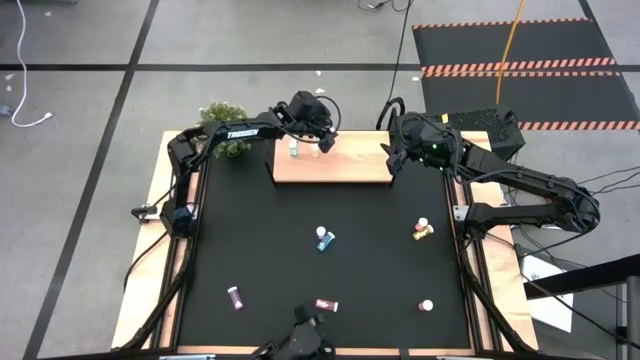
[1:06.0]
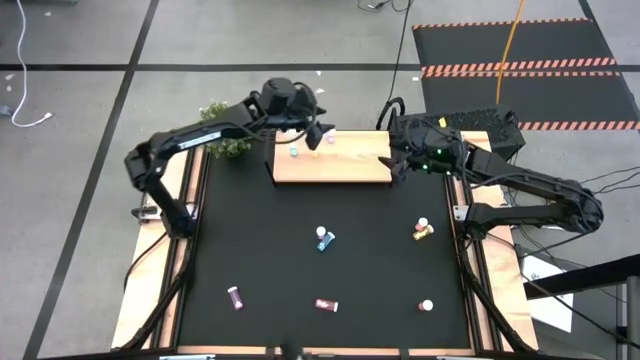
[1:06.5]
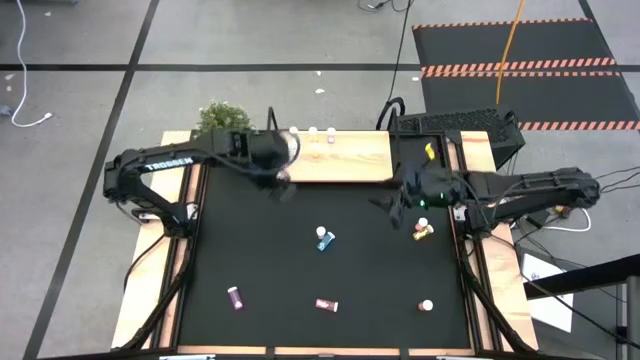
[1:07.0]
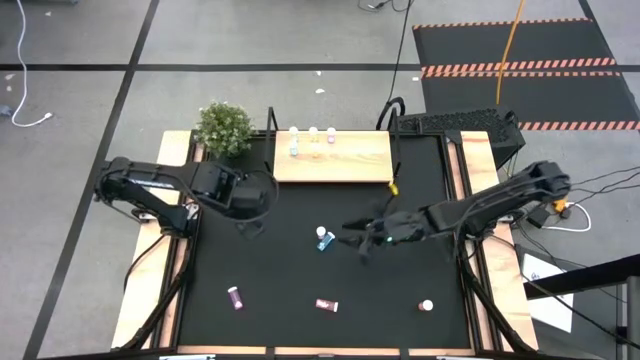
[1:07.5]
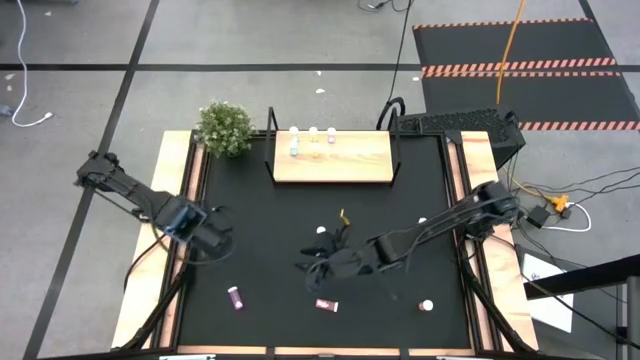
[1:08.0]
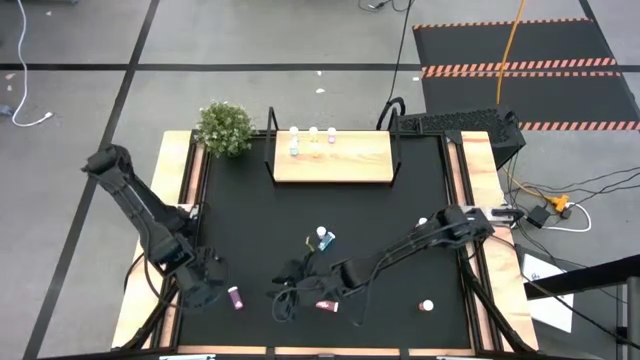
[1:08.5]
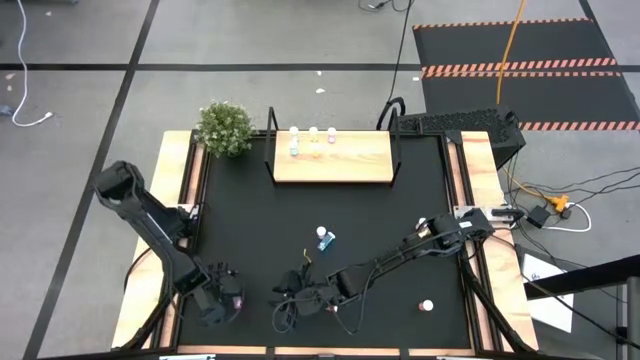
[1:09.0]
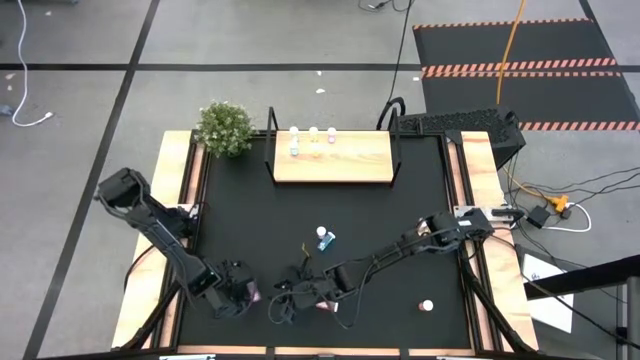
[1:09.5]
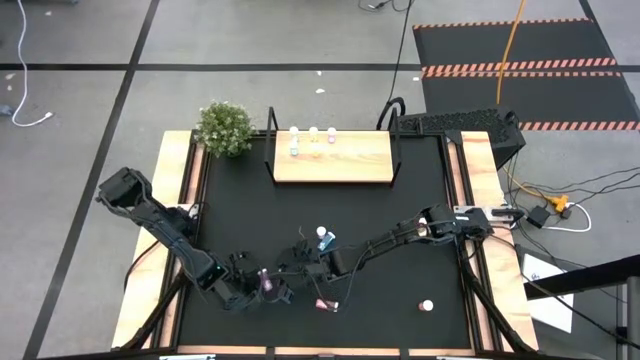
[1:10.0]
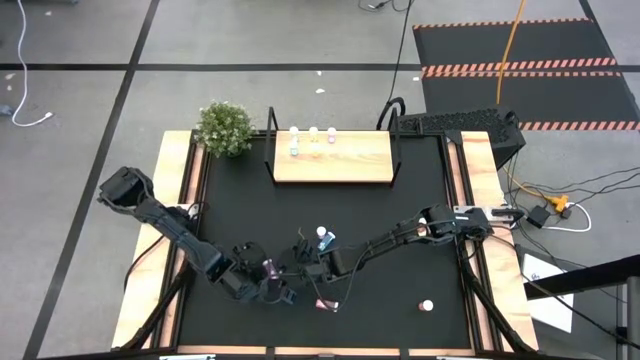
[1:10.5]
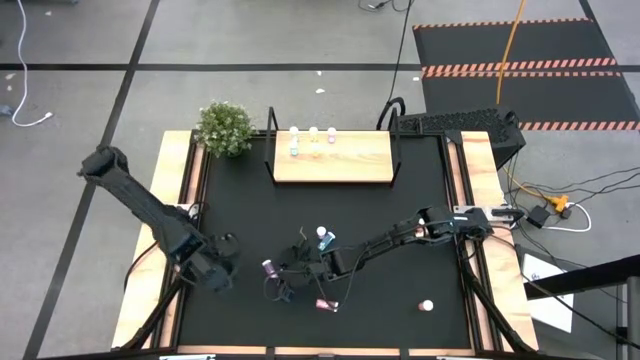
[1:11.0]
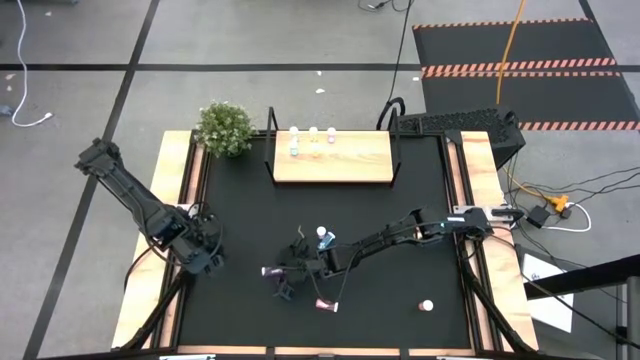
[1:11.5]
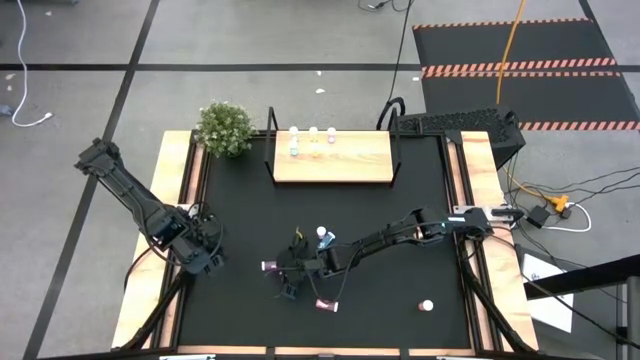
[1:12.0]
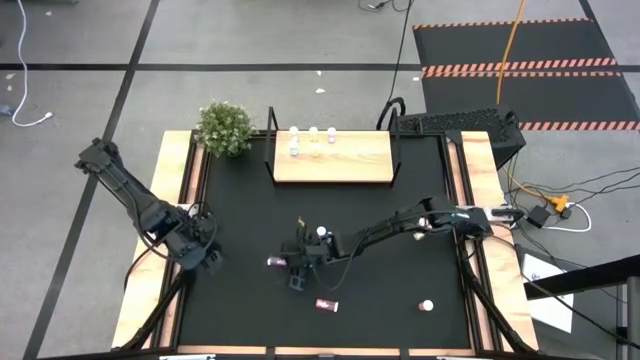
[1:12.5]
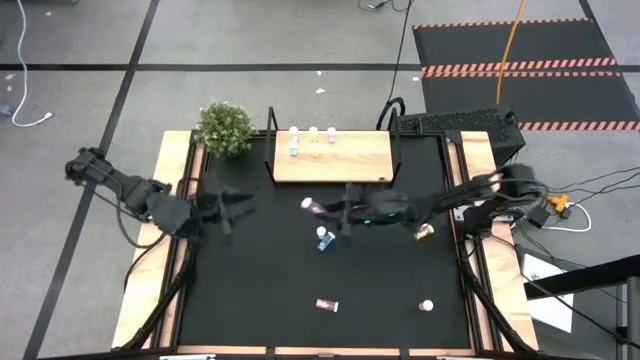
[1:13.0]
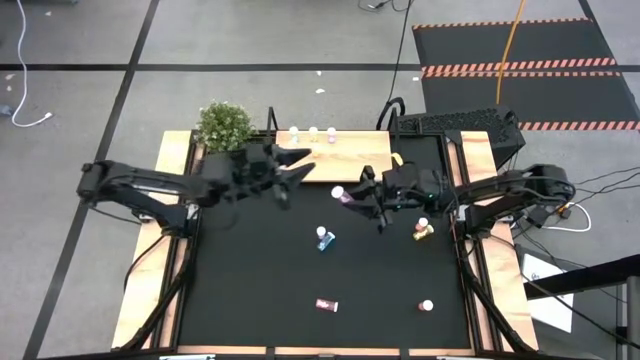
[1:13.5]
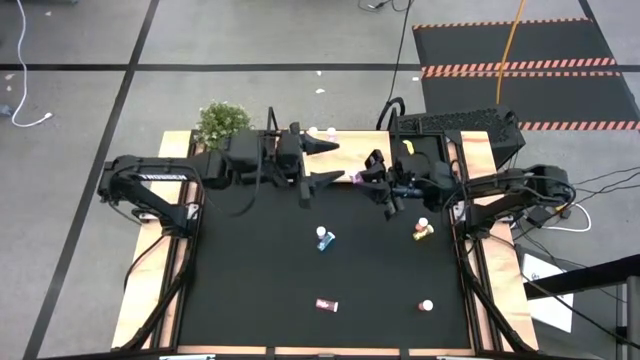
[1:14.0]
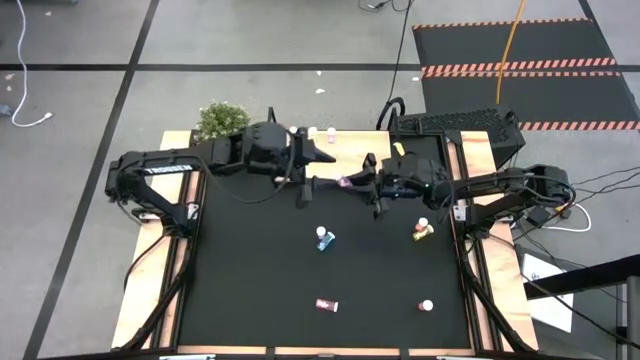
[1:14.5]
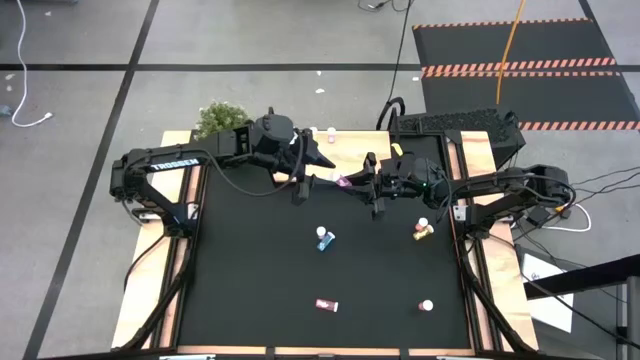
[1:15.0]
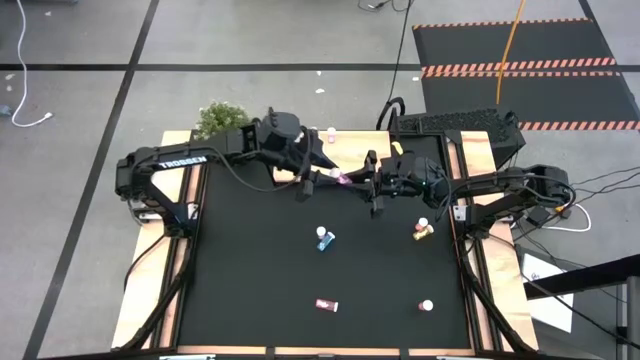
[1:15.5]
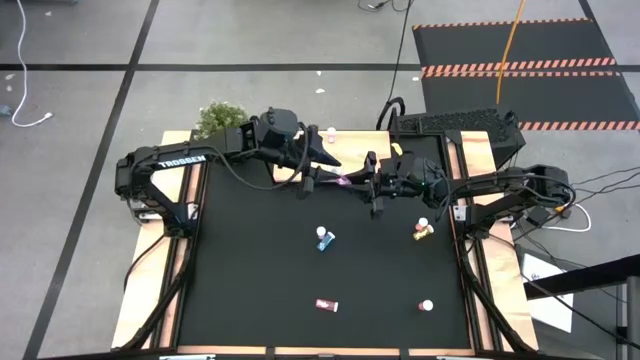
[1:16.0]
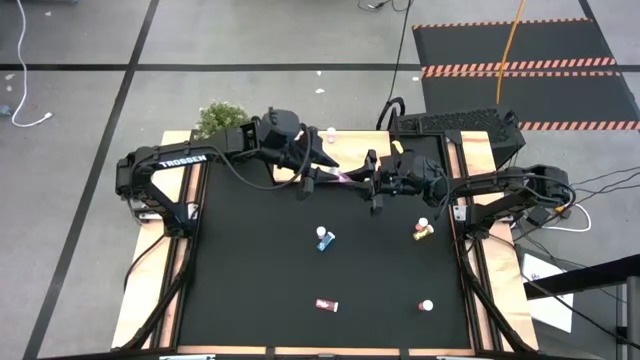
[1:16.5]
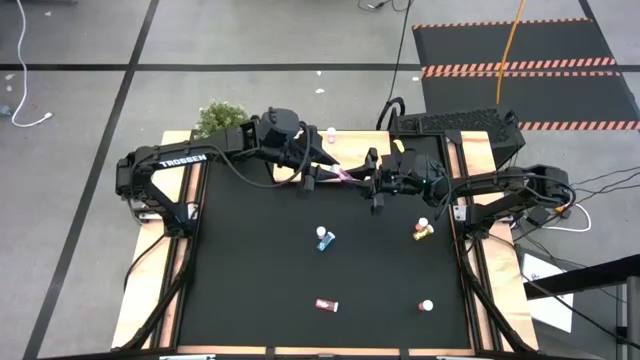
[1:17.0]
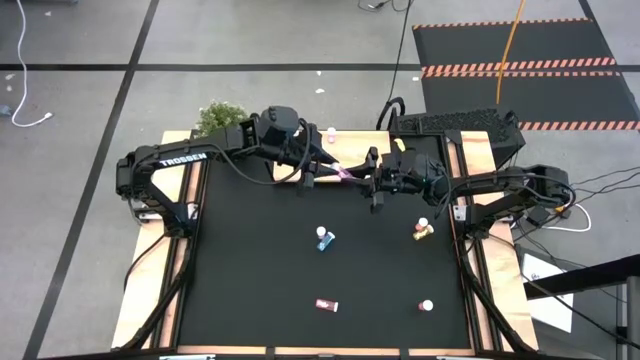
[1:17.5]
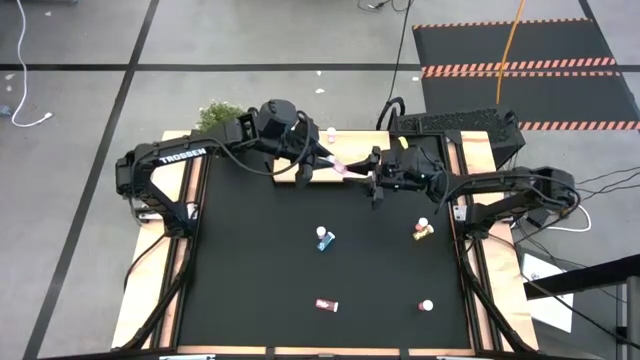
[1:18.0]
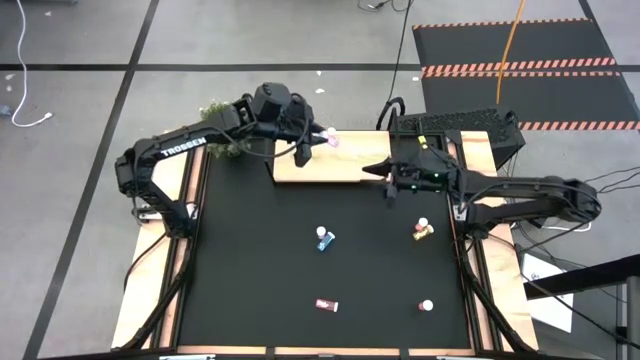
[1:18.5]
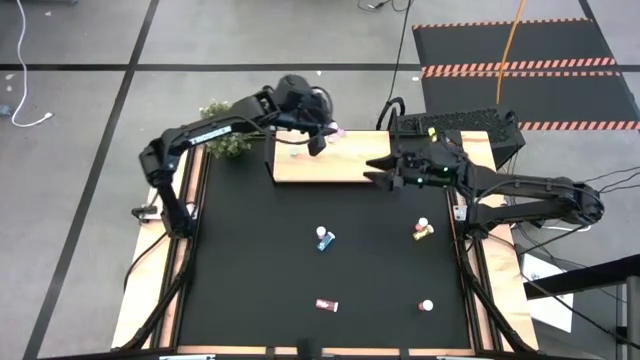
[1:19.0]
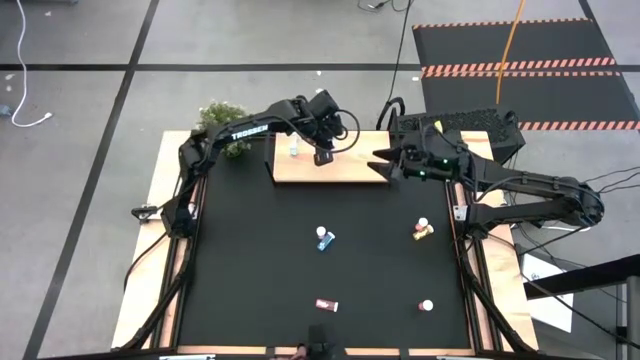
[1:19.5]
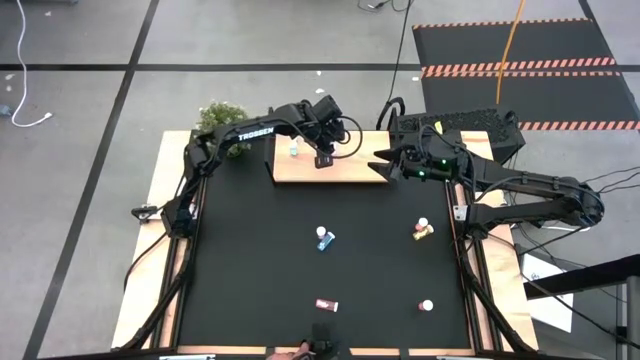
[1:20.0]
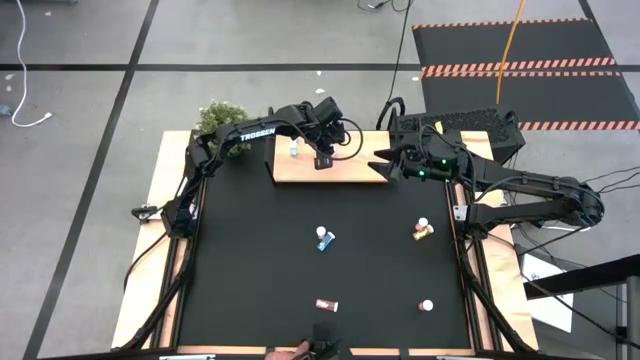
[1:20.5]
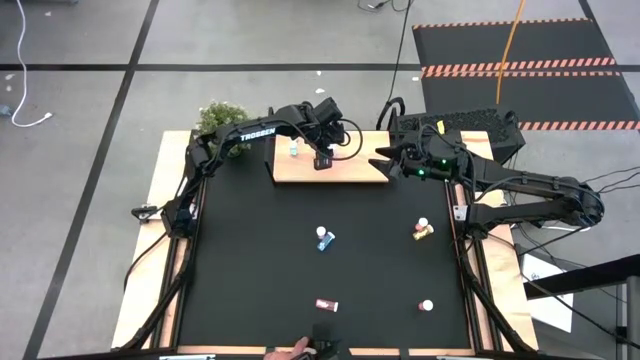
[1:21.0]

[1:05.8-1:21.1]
Task: Pick and place medicine bottles onto shelf by color
Put the bottom left pink pill bottle on the shelf

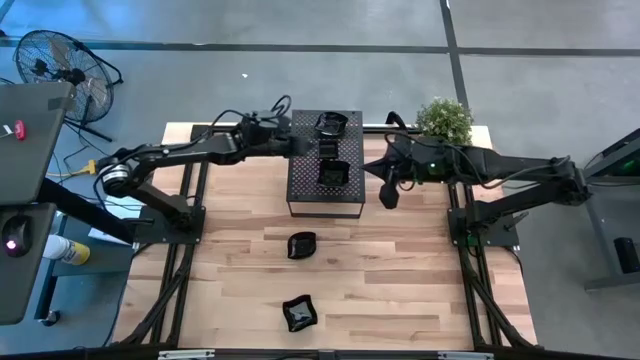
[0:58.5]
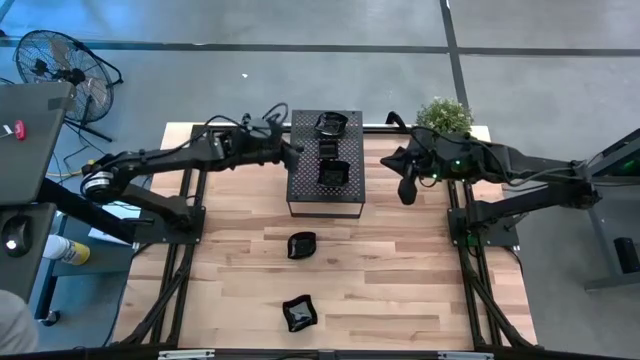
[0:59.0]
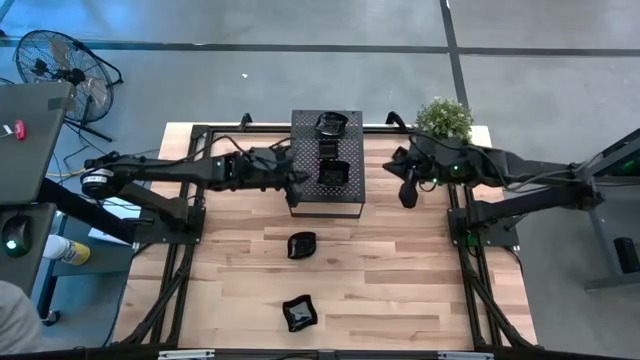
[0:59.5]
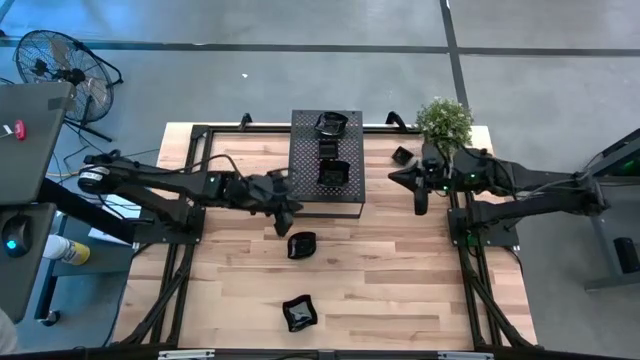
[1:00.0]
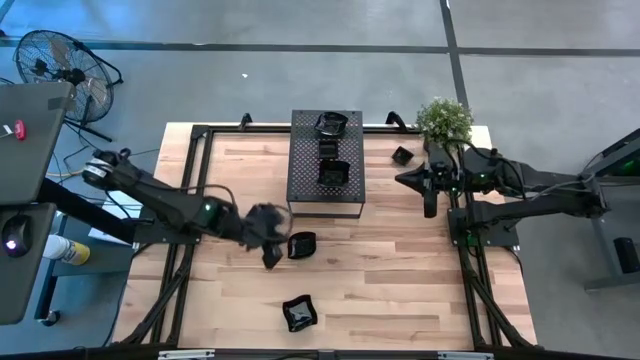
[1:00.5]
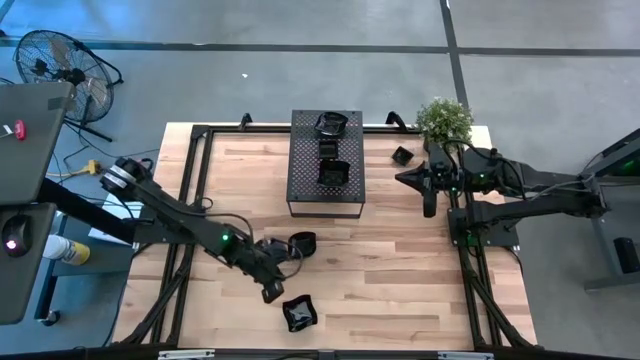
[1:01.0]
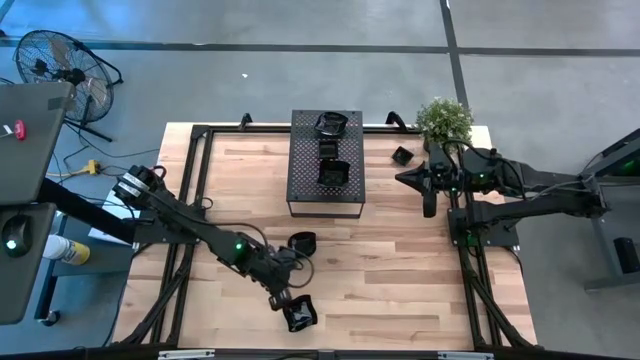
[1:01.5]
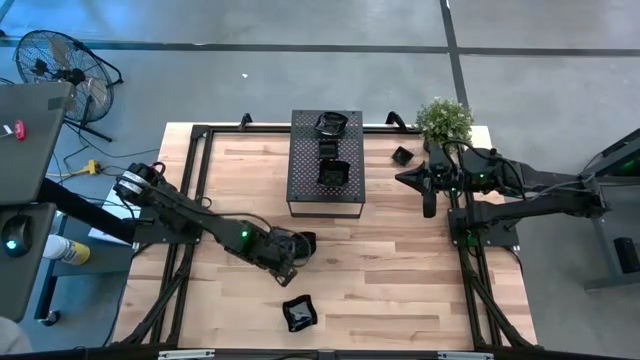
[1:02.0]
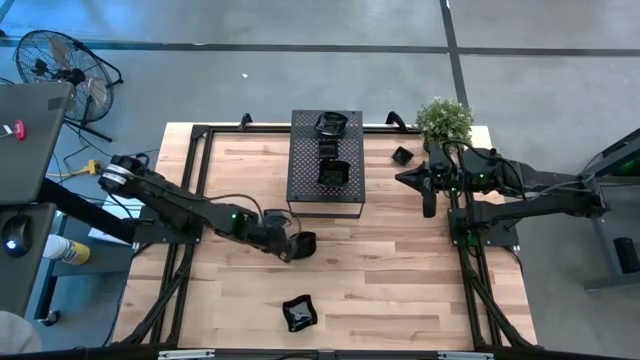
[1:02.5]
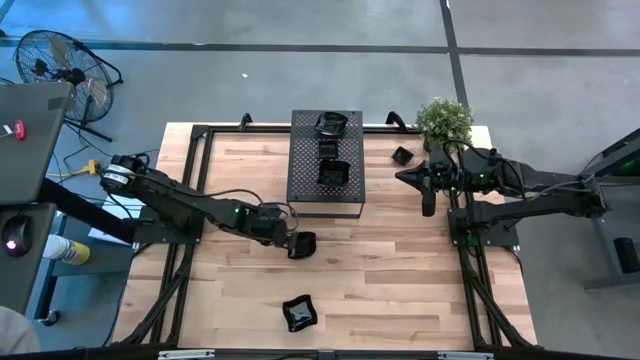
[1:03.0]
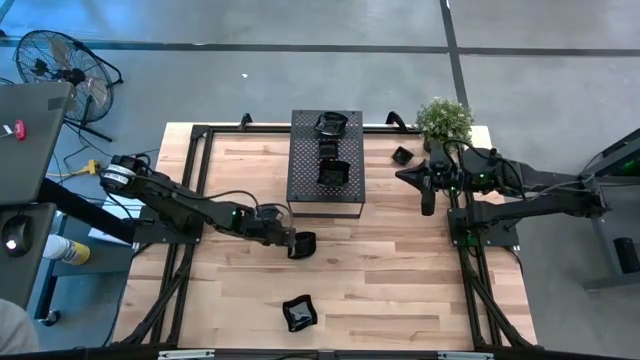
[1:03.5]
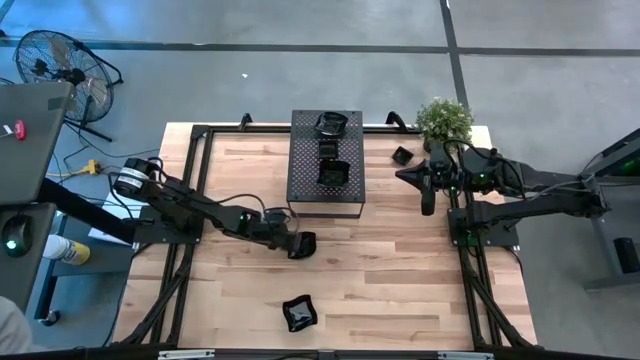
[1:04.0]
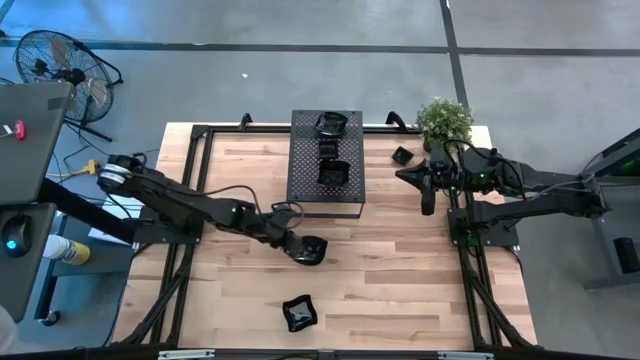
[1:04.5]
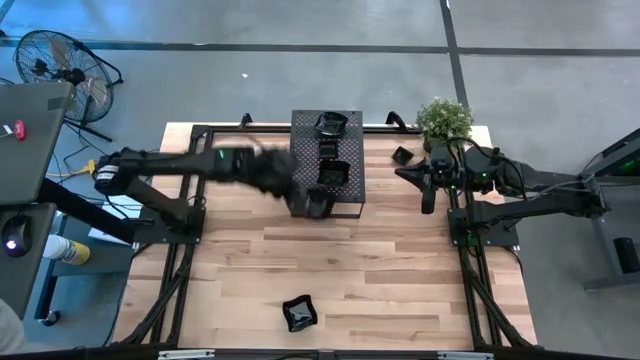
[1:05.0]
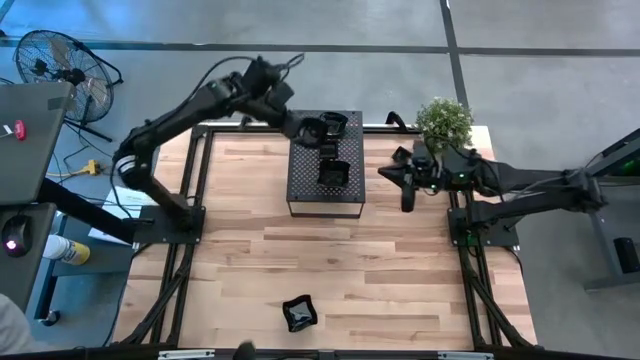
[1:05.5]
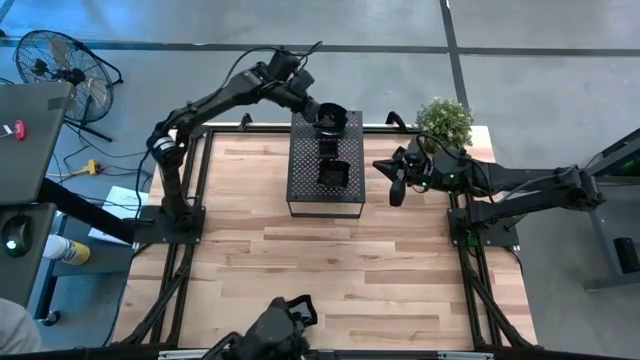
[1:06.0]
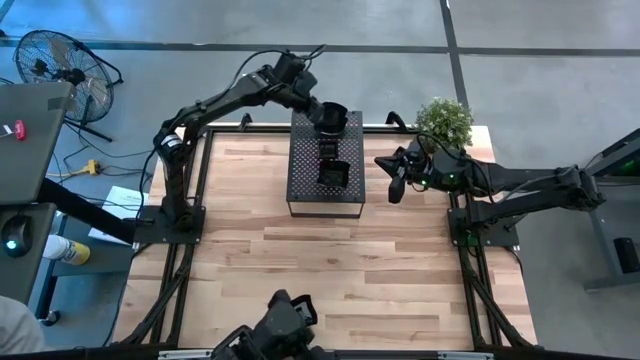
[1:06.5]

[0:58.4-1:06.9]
Task: Pick & Place Mini shaped plates
Stack the leaf-shaped plate on top of the stacked leaf-shaped plates on the shelf
